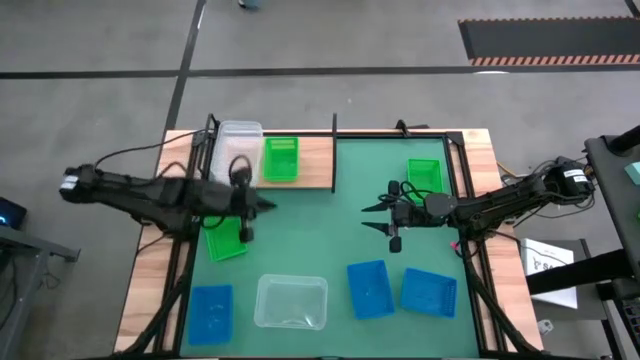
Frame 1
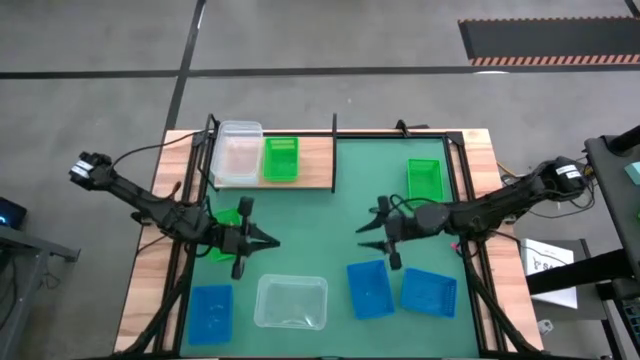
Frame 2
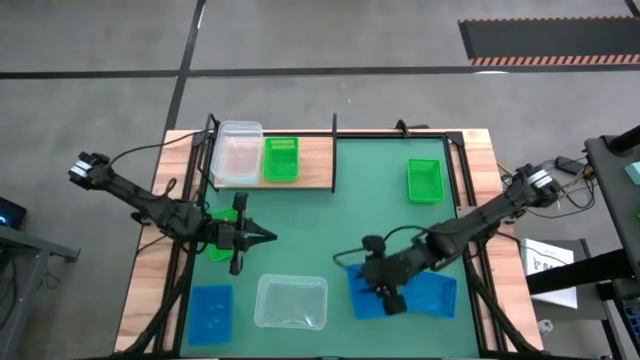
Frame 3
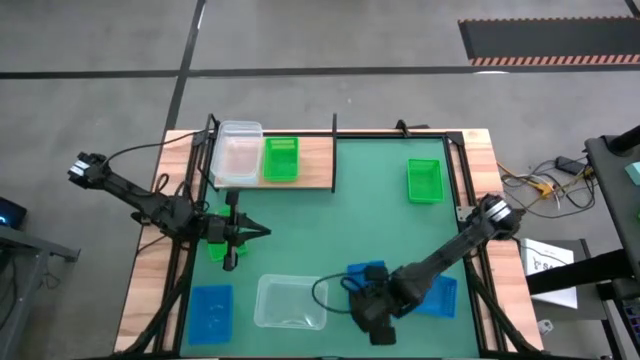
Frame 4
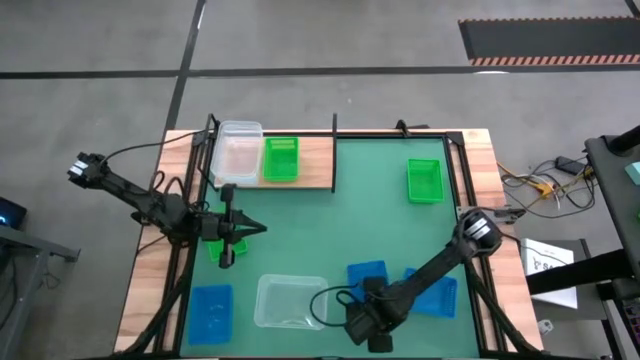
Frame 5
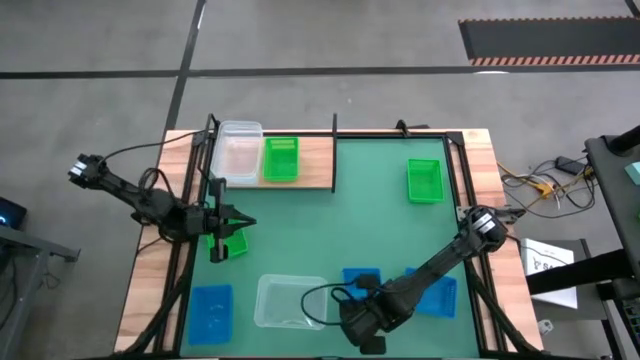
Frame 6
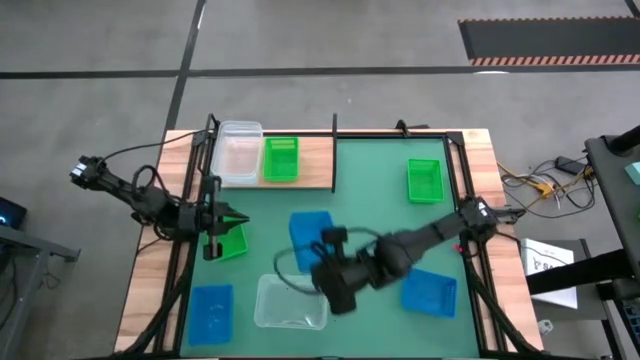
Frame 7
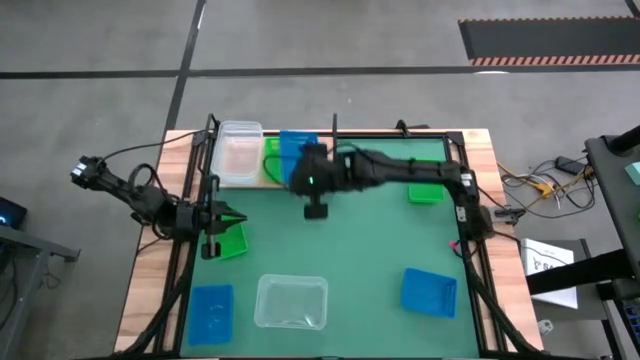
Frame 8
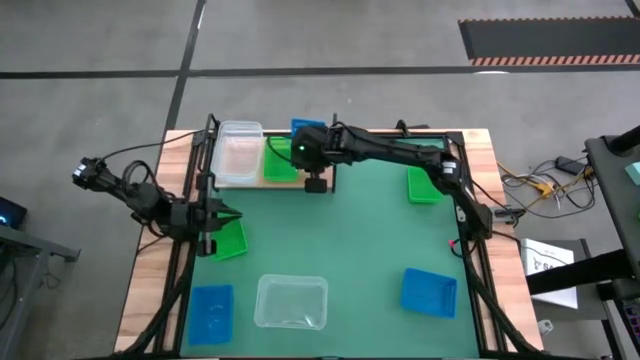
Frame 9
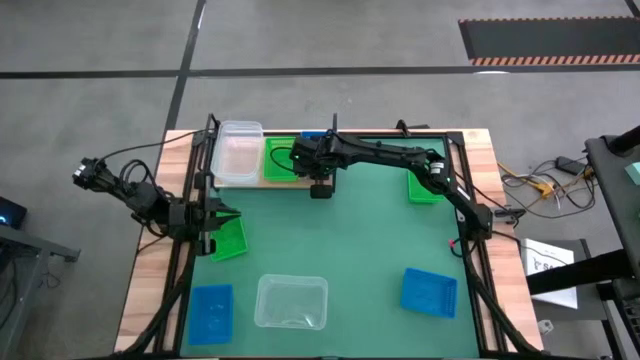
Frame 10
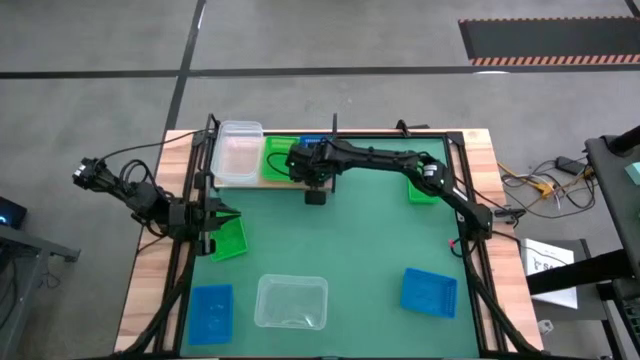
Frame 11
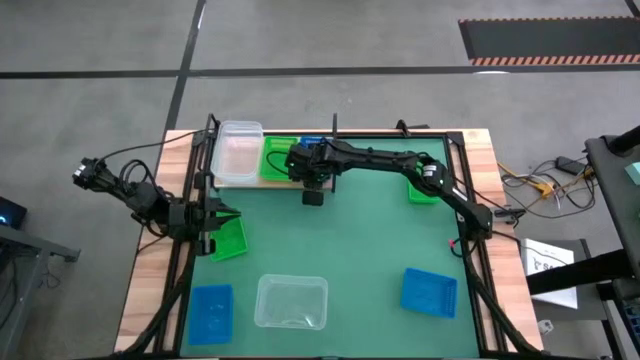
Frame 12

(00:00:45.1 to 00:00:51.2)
Task: Stack baskets on shelf by color
Put the middle blue bin on the shelf

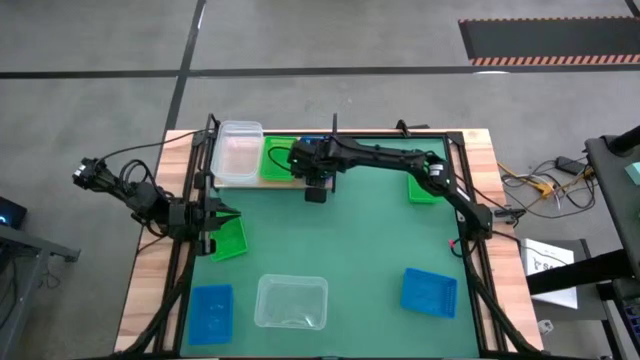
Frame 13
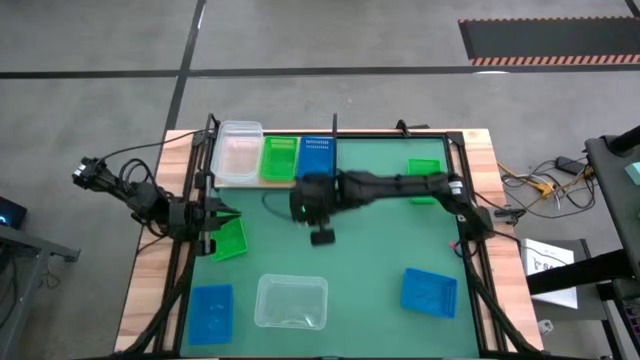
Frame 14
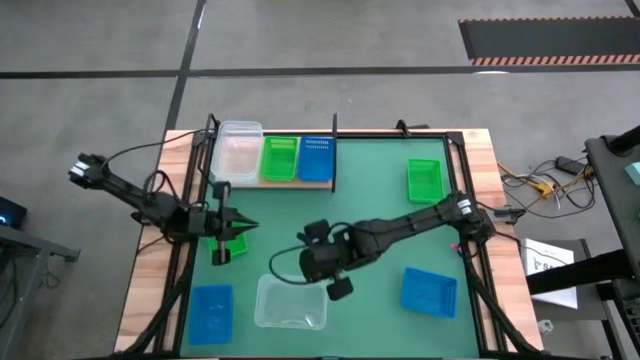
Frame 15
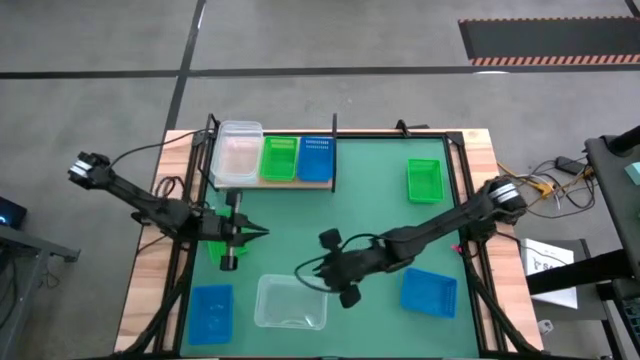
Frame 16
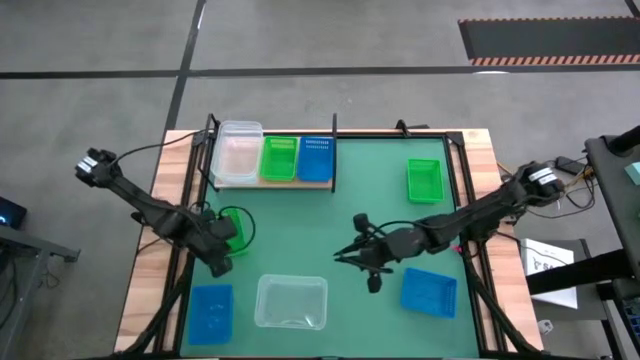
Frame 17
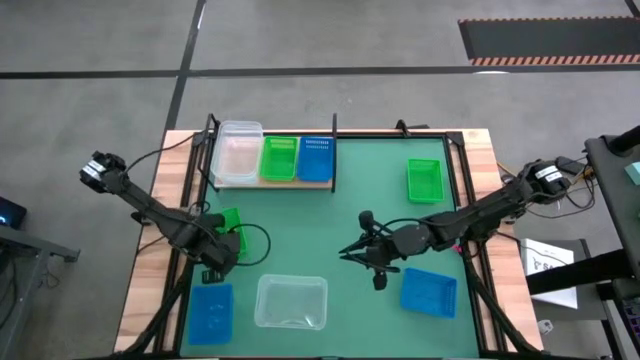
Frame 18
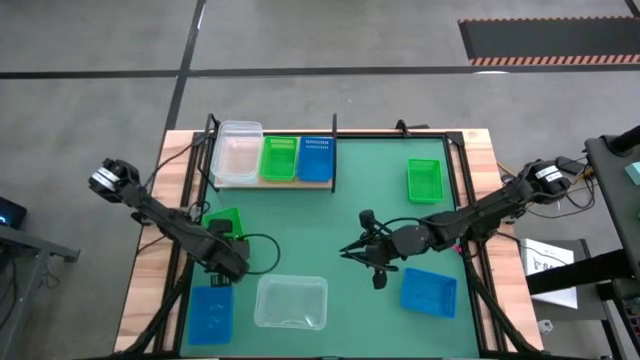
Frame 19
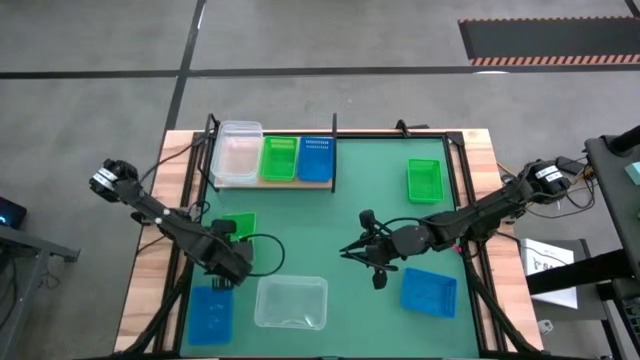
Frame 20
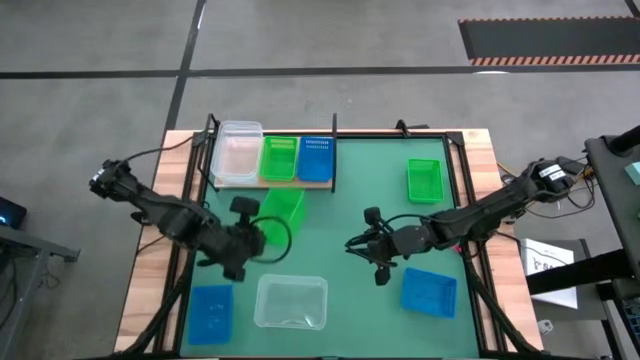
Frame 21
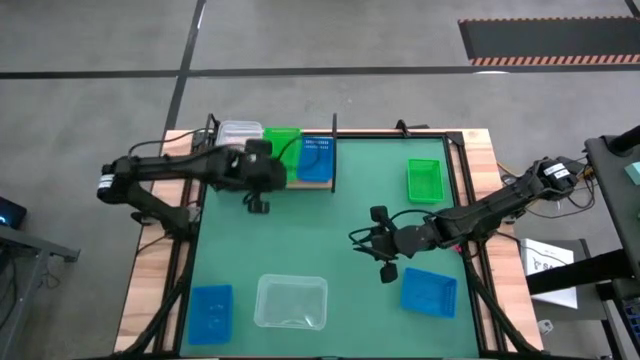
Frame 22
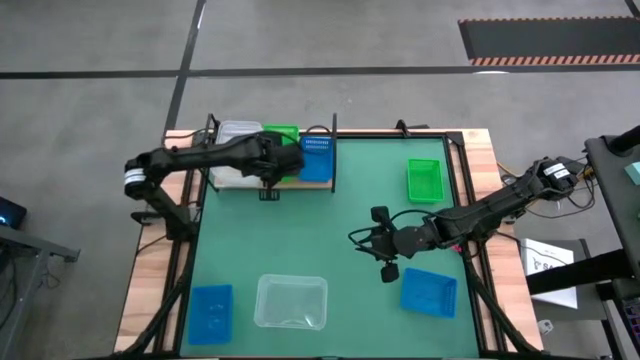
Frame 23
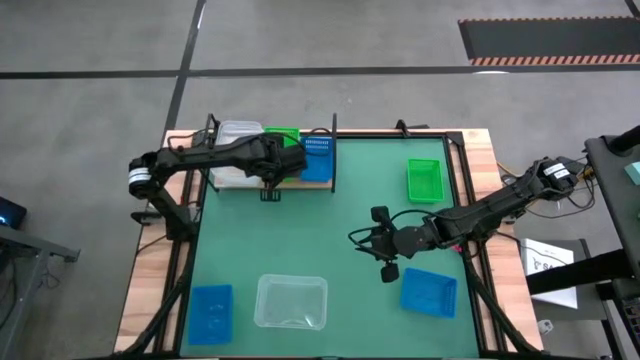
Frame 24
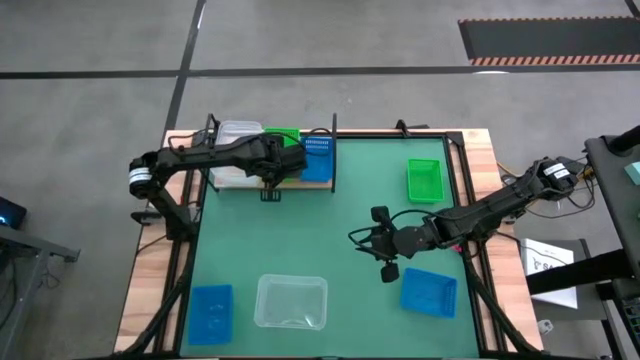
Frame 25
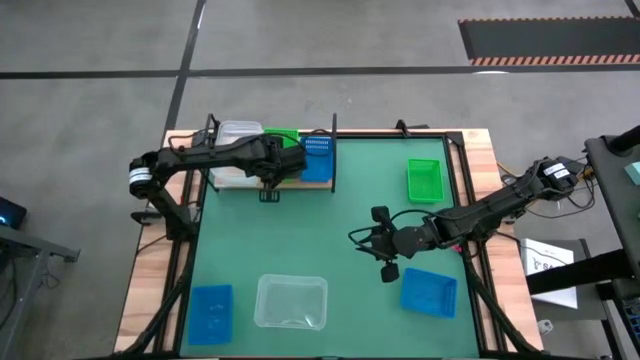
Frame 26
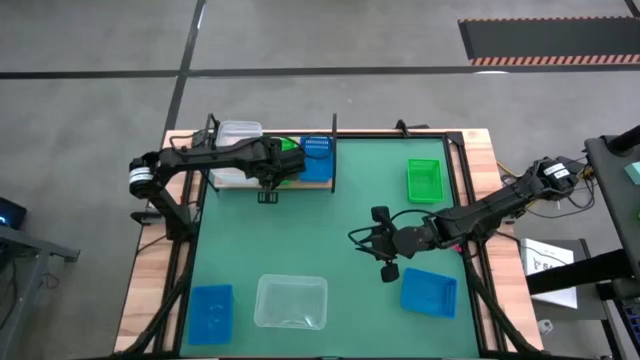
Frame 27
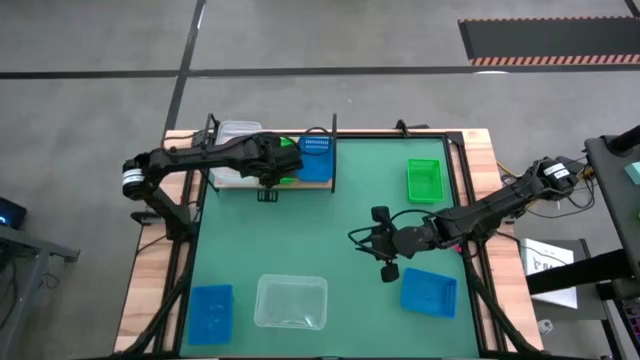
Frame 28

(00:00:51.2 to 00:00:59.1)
Stack the left green bin on top of the other green bin on the shelf

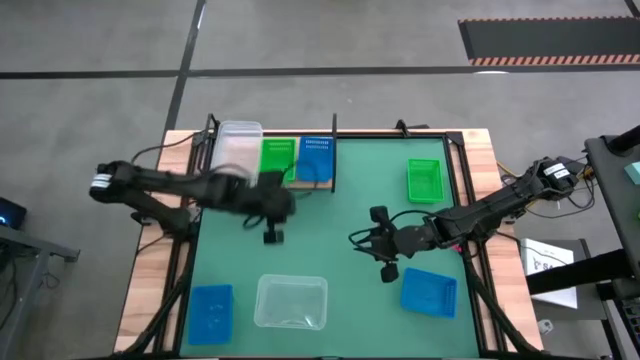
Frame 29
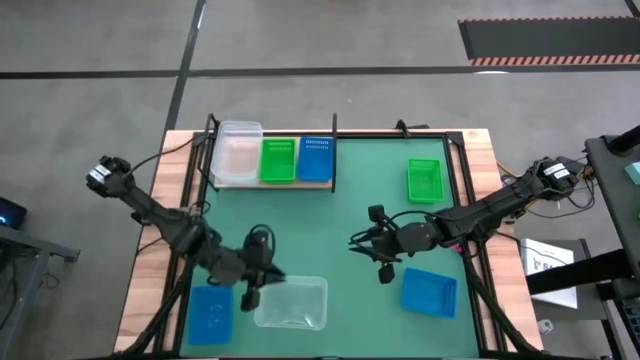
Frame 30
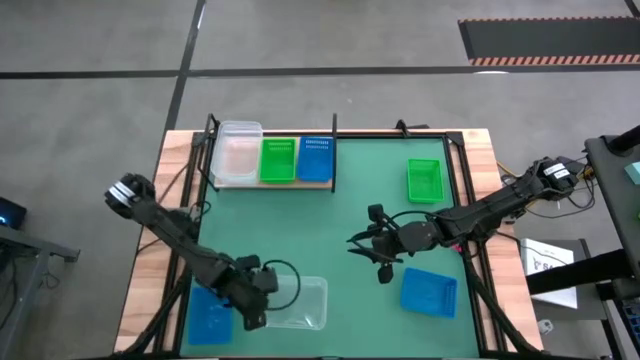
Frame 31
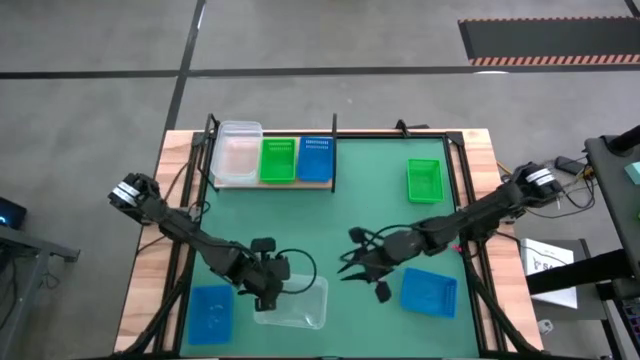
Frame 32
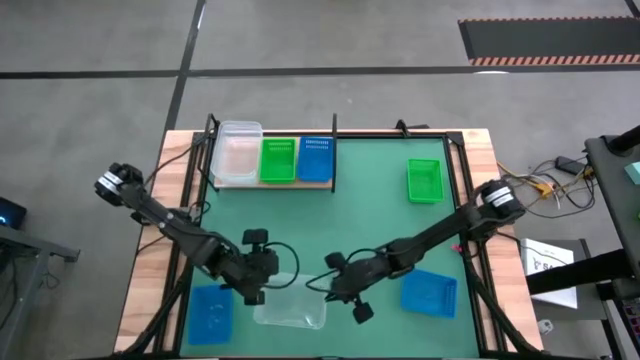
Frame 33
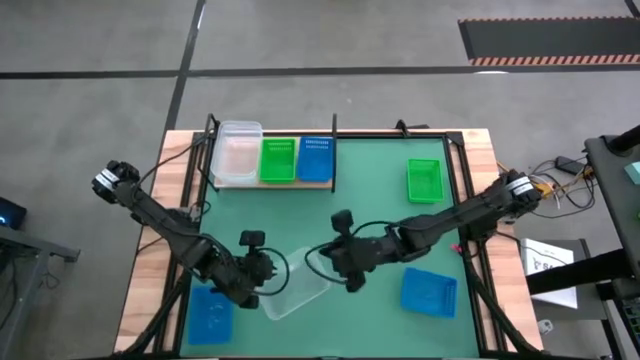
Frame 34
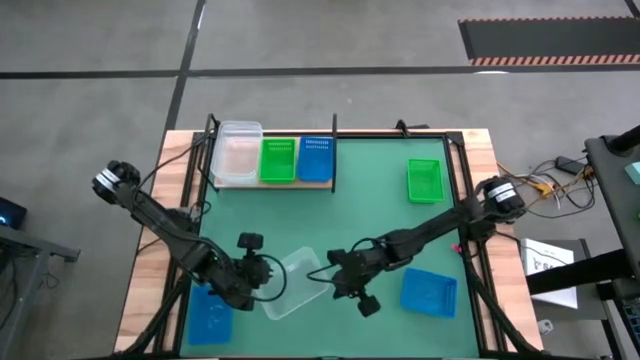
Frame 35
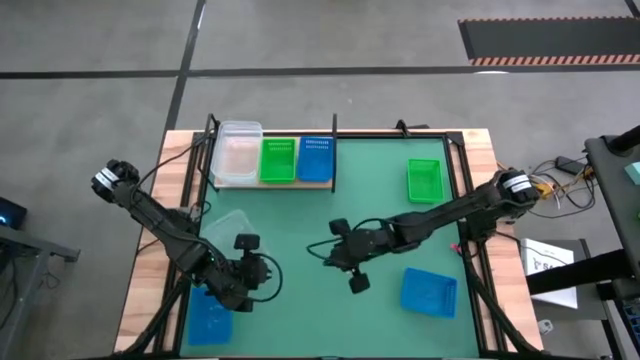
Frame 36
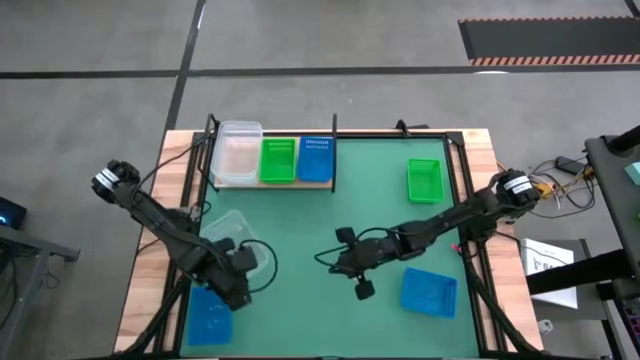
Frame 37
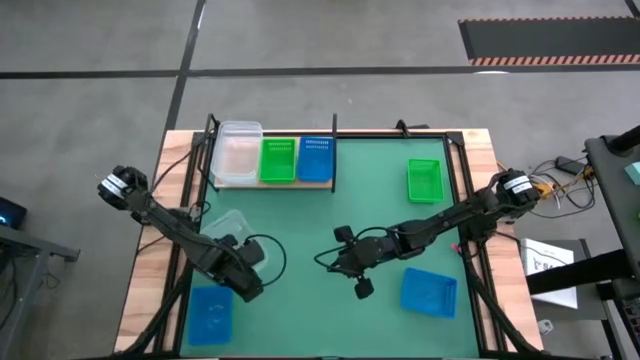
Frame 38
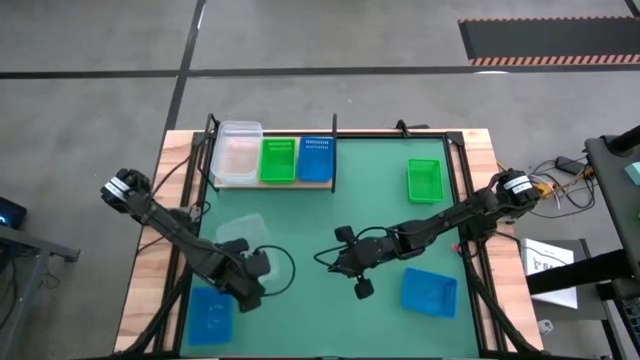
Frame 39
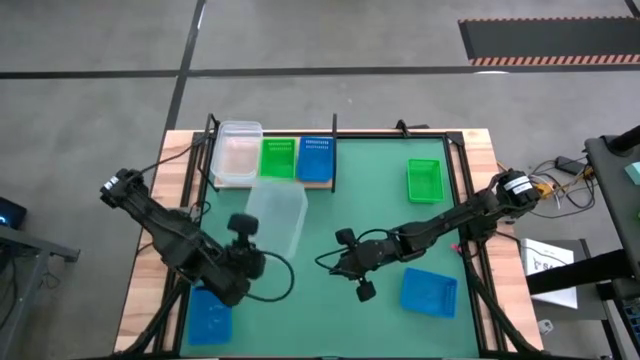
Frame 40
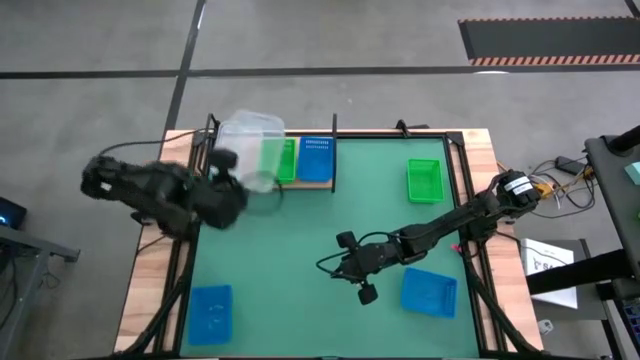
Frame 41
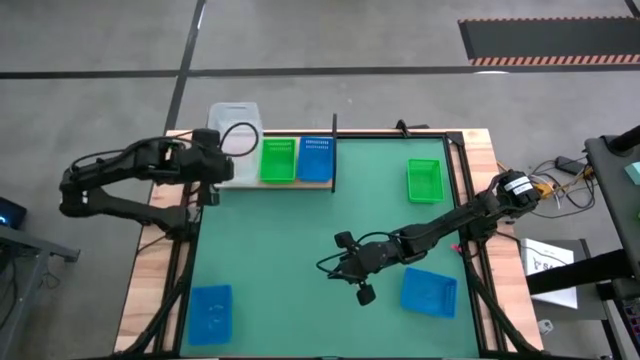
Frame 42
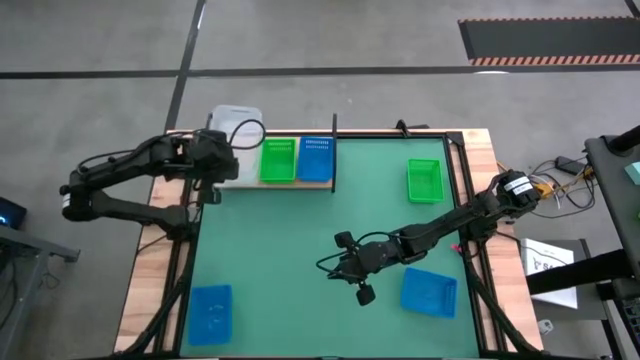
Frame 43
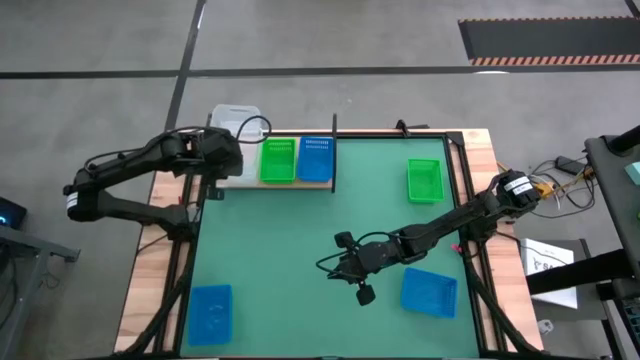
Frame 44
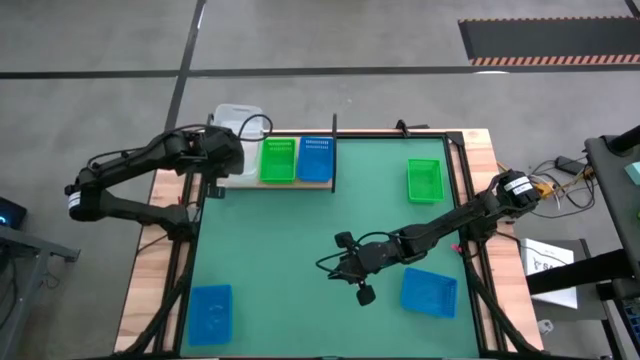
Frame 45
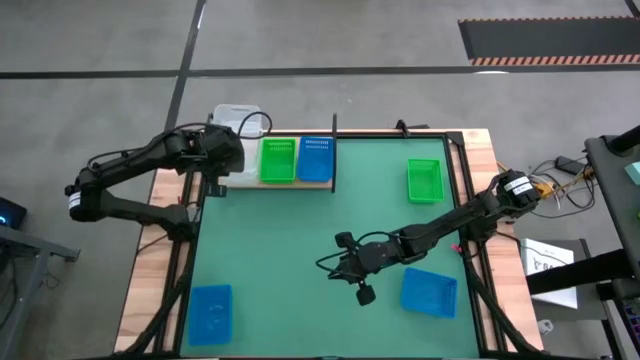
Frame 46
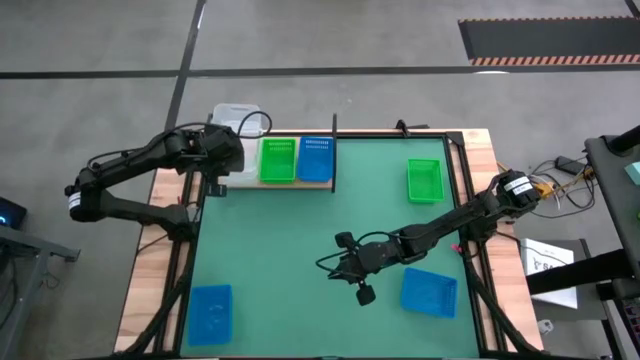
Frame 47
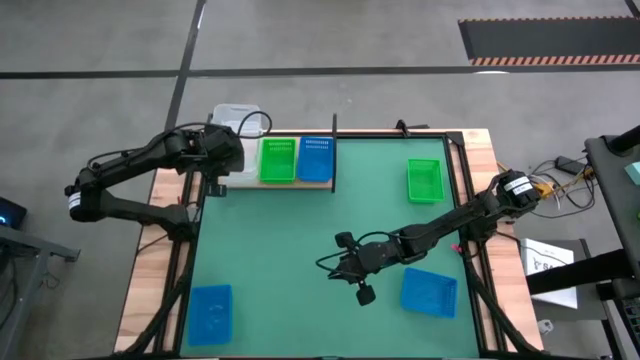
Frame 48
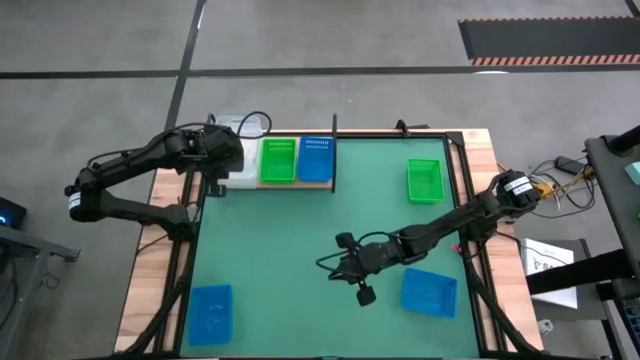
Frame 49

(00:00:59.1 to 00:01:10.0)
Stack the transparent bin on top of the other transparent bins on the shelf
